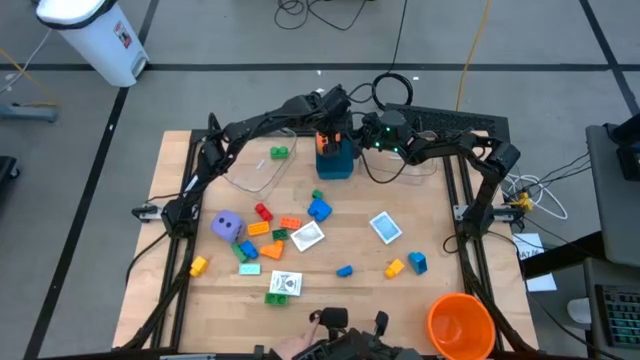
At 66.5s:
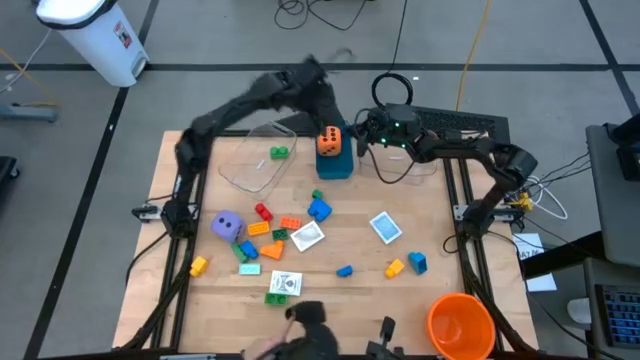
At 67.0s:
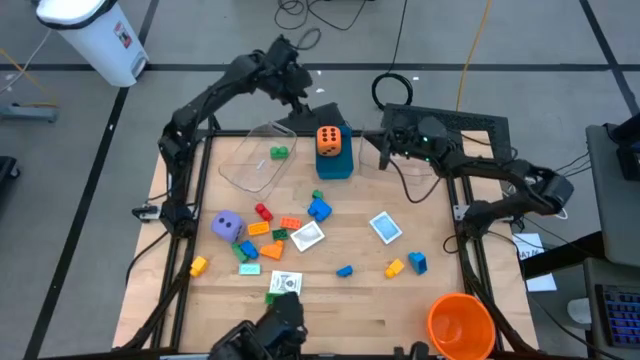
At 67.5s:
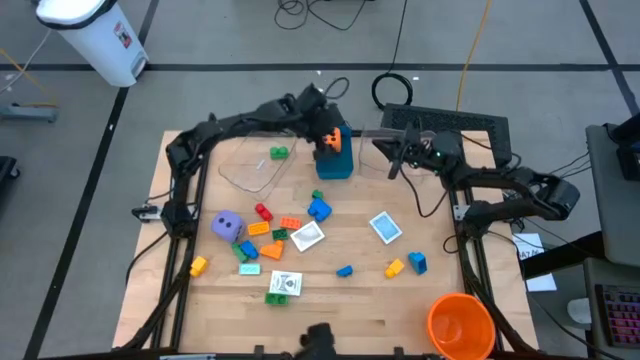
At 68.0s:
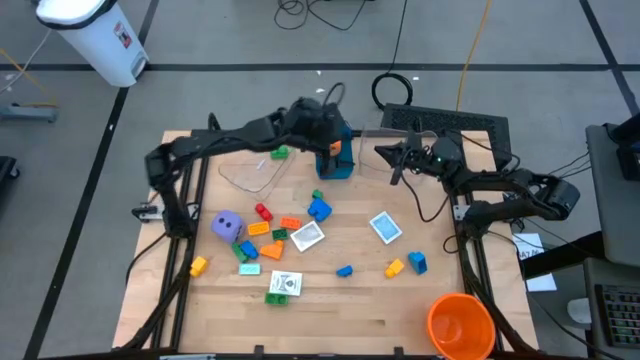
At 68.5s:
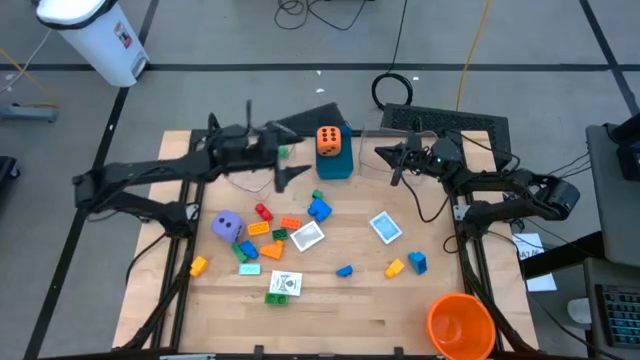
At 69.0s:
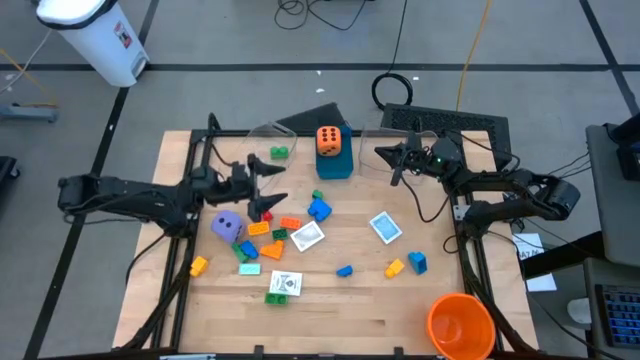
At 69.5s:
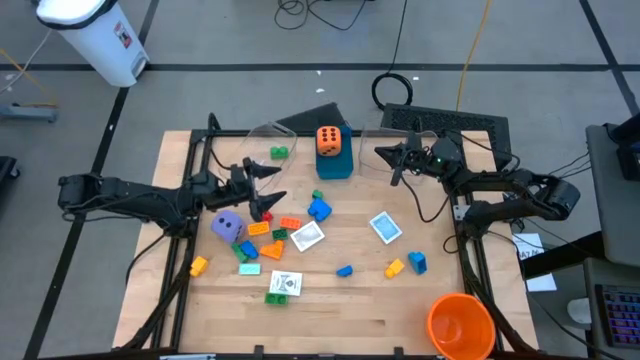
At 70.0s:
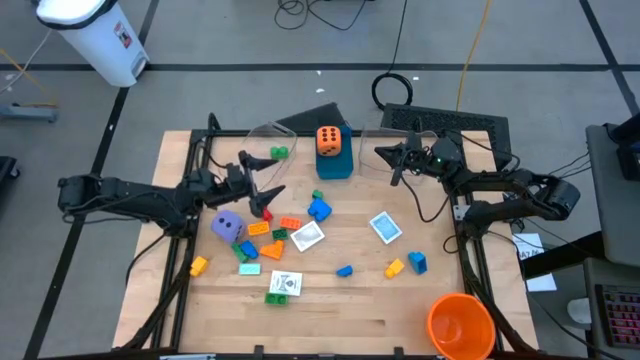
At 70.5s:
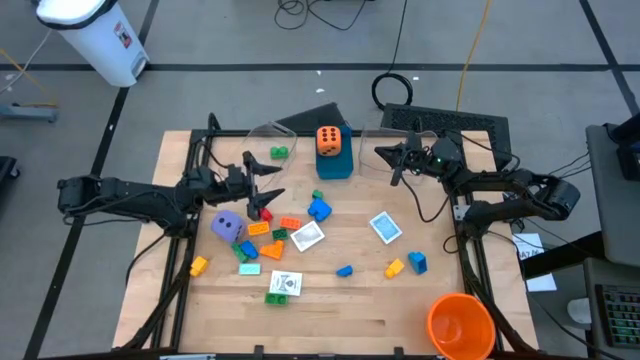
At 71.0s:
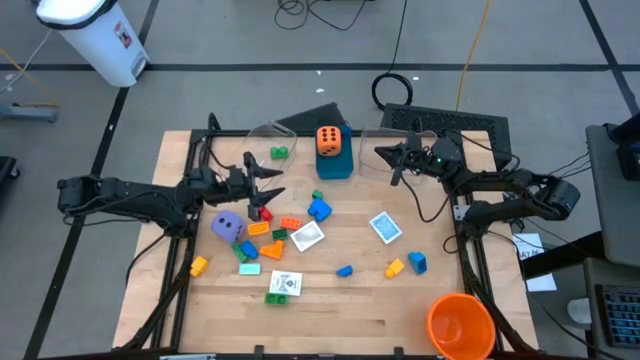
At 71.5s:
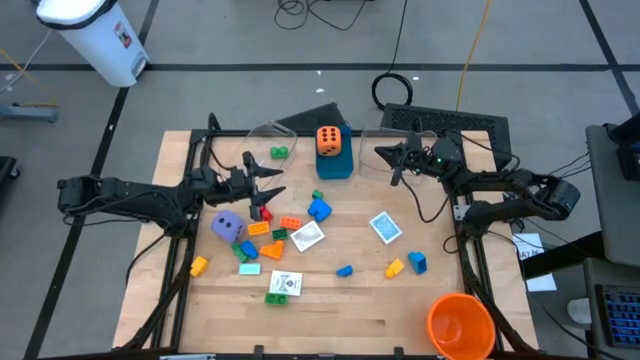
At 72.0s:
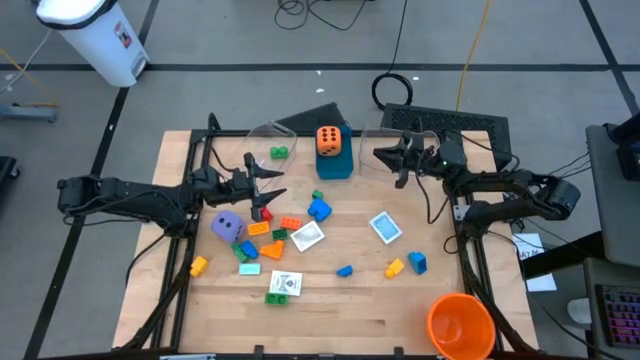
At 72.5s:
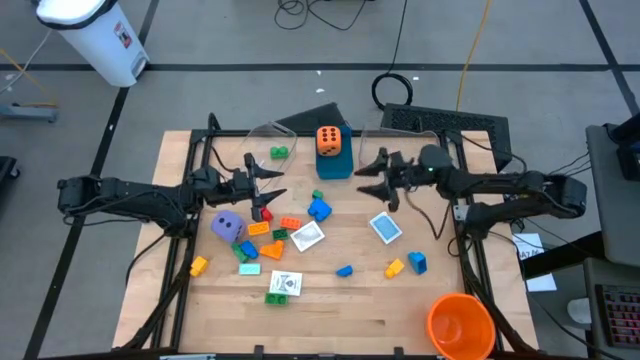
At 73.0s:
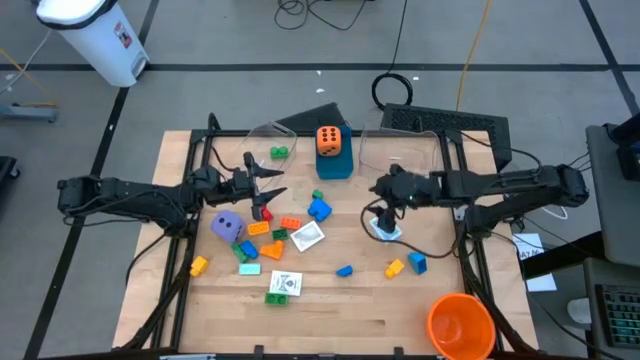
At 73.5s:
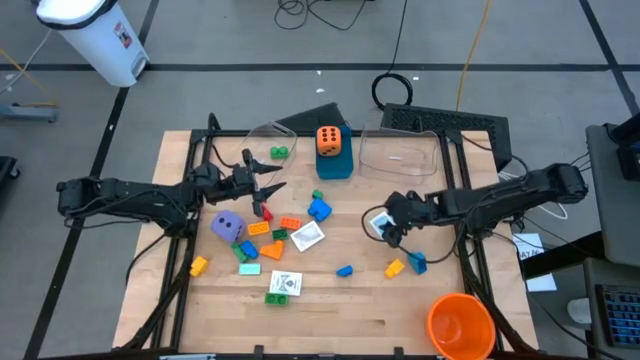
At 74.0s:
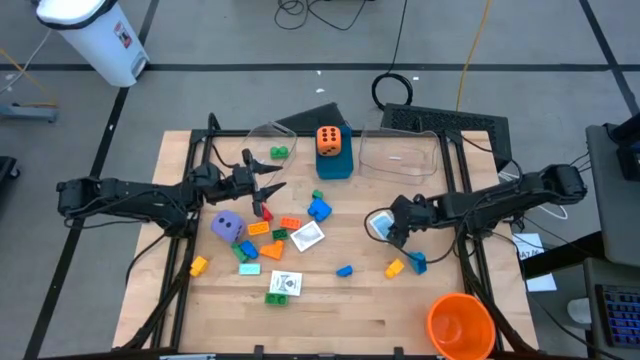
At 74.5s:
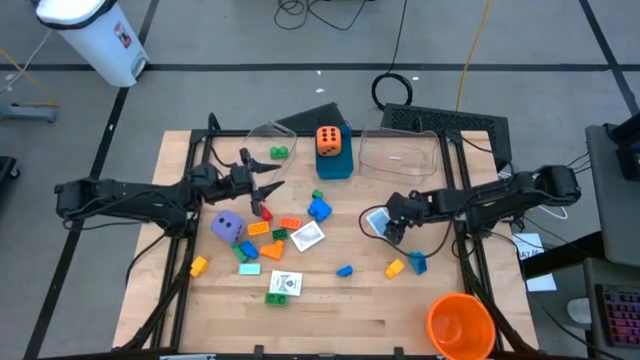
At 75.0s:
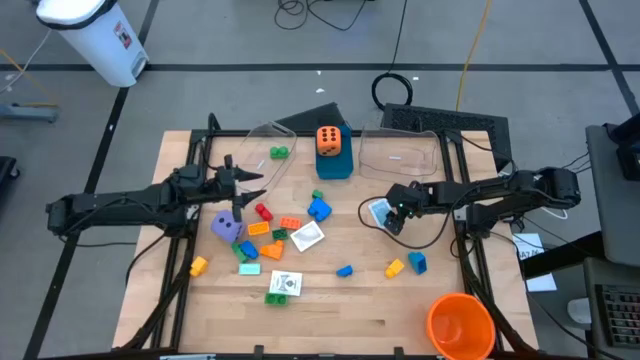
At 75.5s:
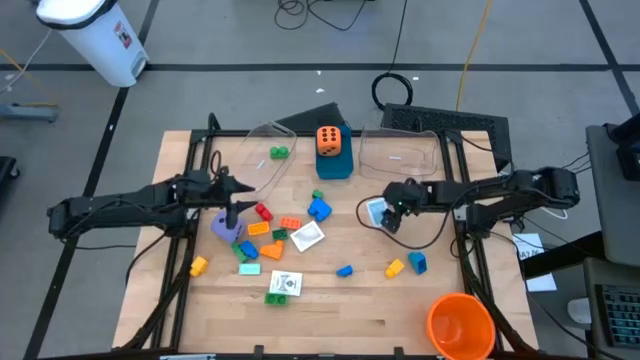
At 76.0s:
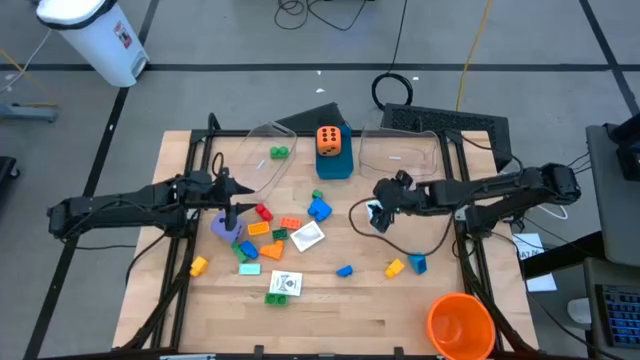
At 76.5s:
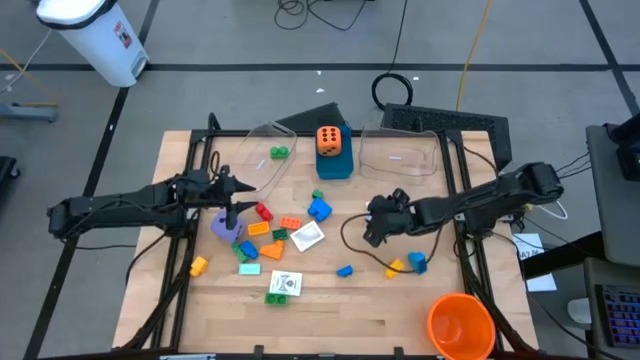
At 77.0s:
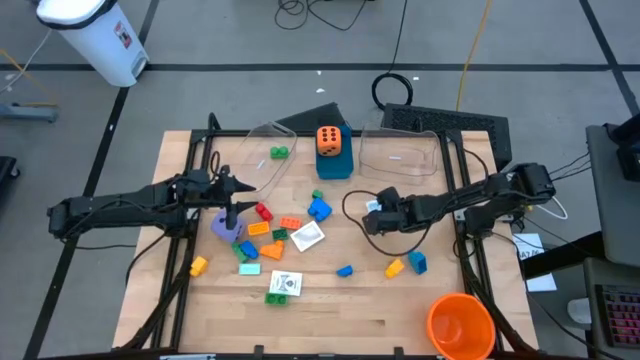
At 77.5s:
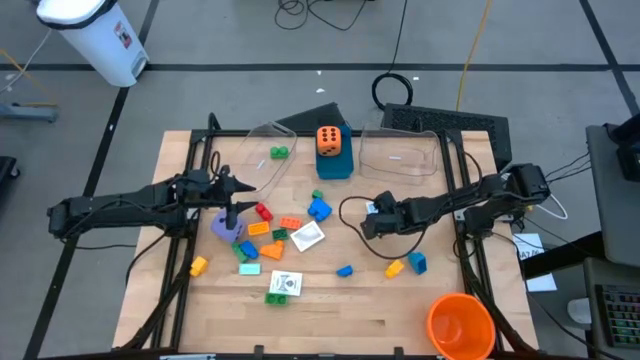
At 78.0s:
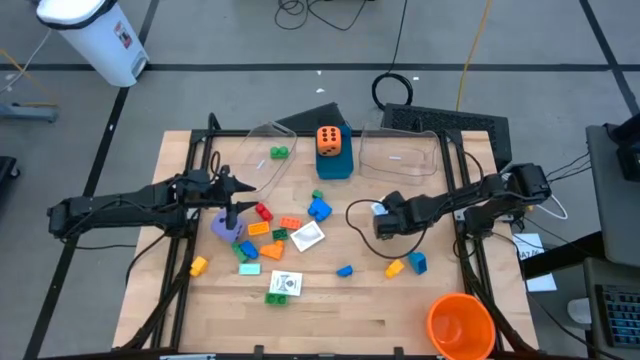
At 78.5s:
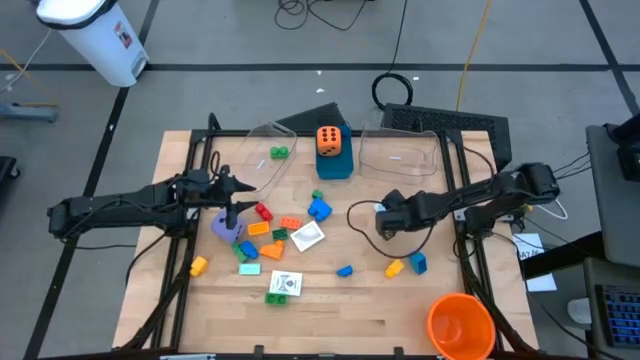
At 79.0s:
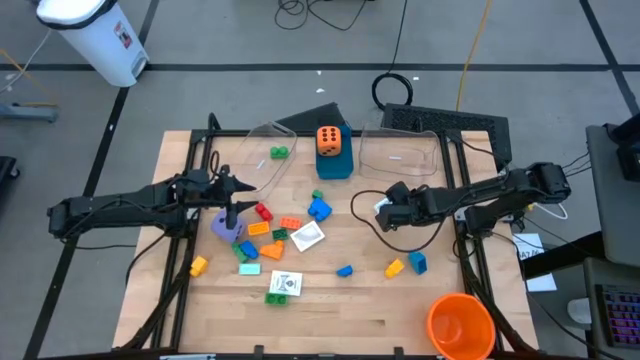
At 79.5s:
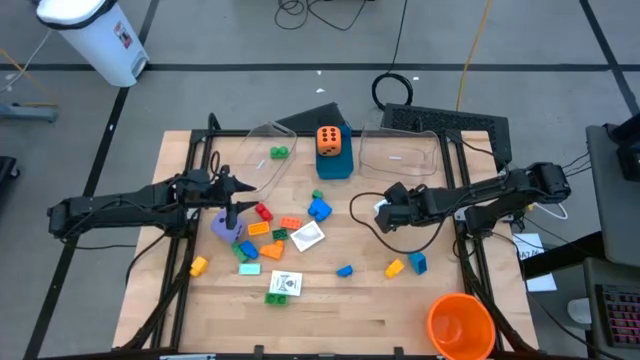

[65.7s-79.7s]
Task: Pick & Place Toys
Put the green playing card into the right transparent bin

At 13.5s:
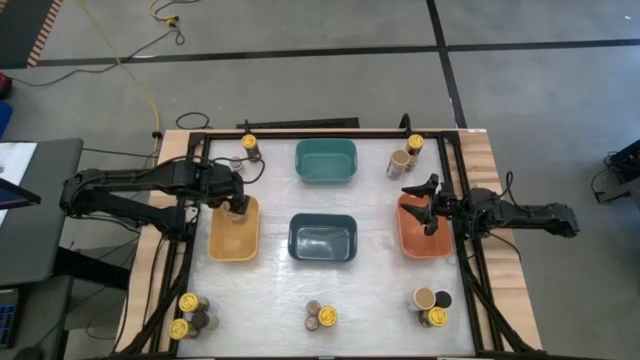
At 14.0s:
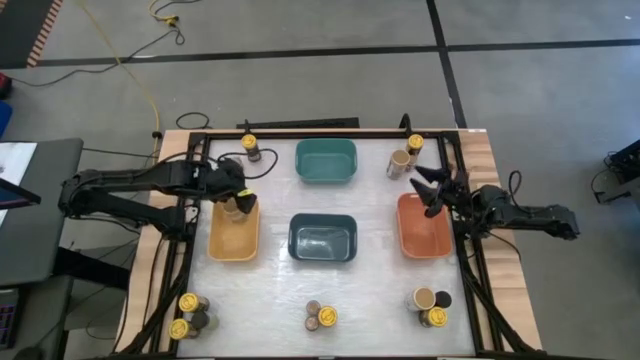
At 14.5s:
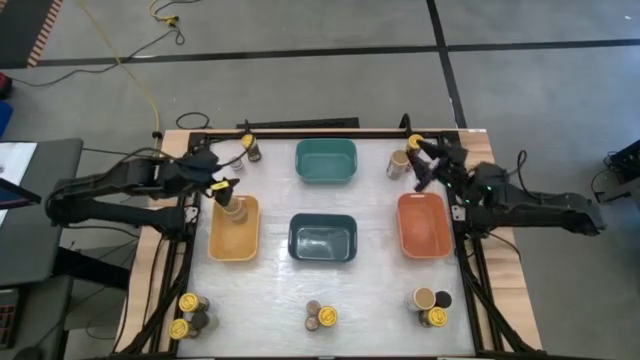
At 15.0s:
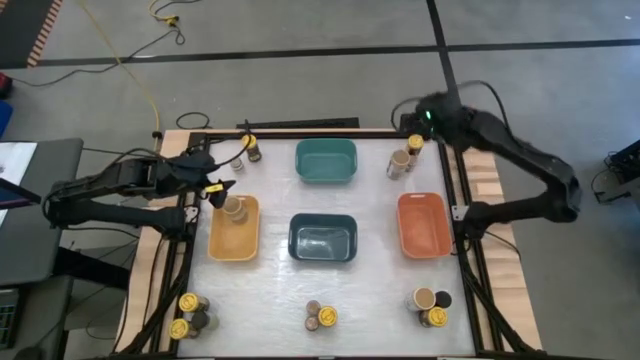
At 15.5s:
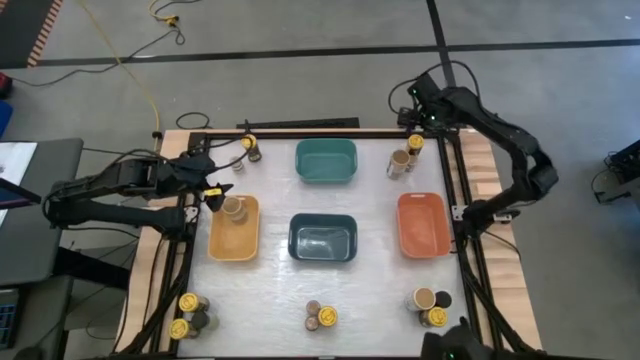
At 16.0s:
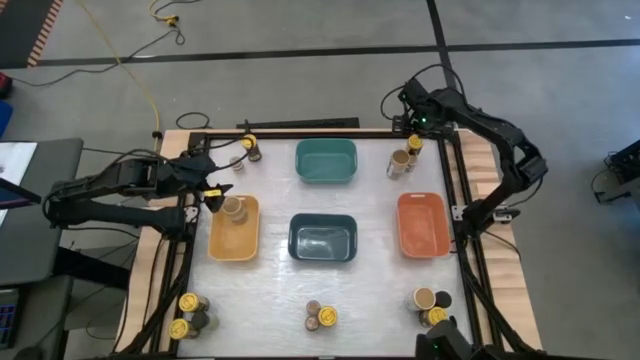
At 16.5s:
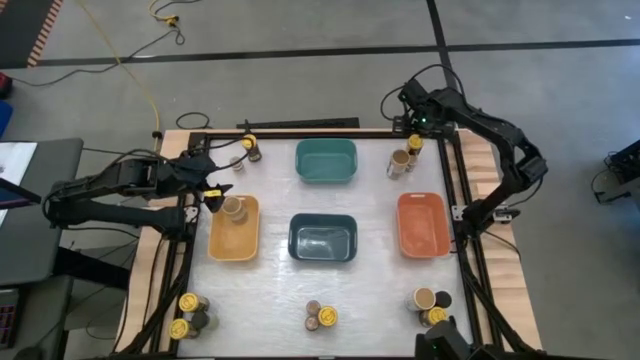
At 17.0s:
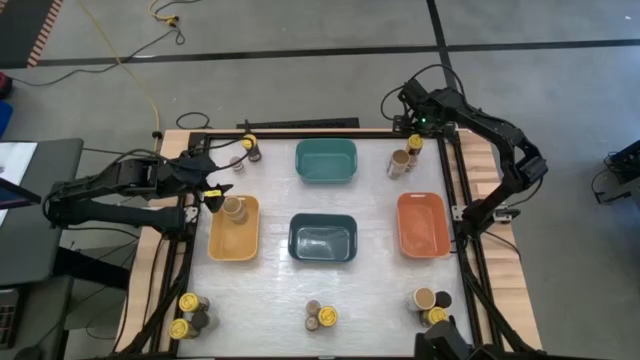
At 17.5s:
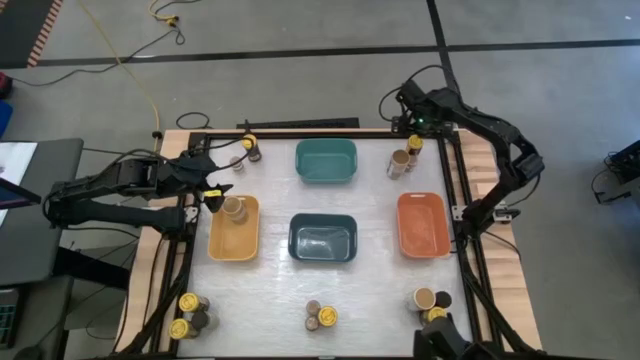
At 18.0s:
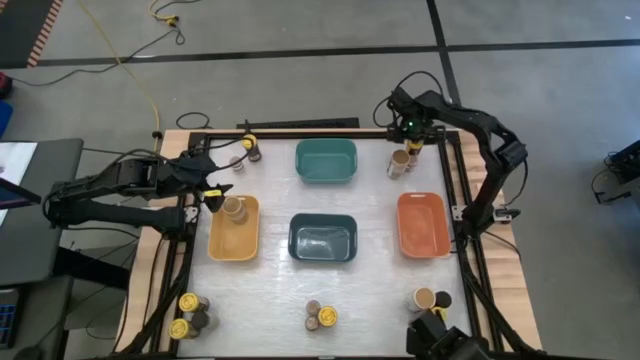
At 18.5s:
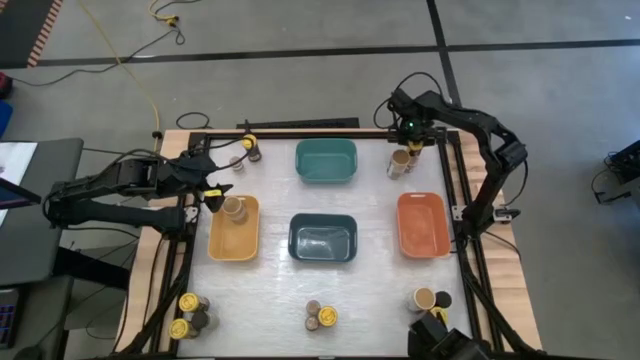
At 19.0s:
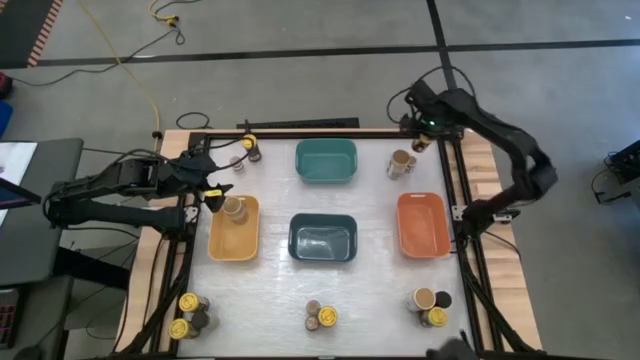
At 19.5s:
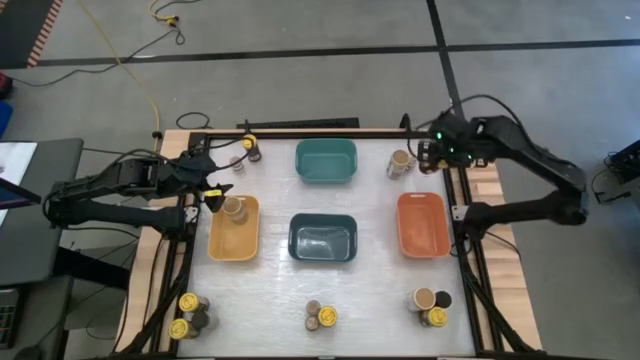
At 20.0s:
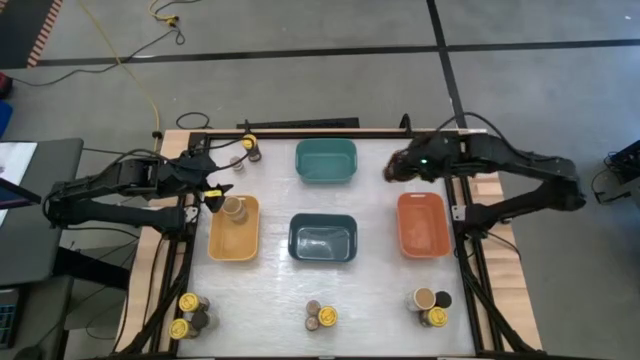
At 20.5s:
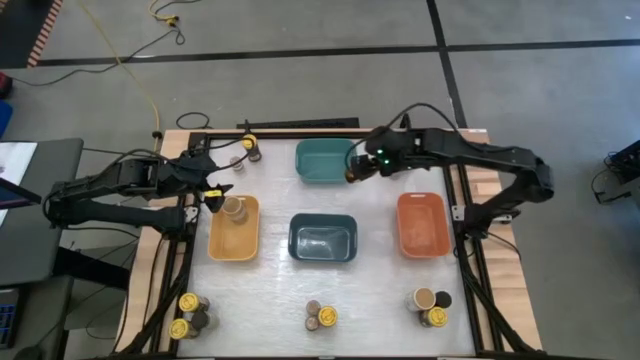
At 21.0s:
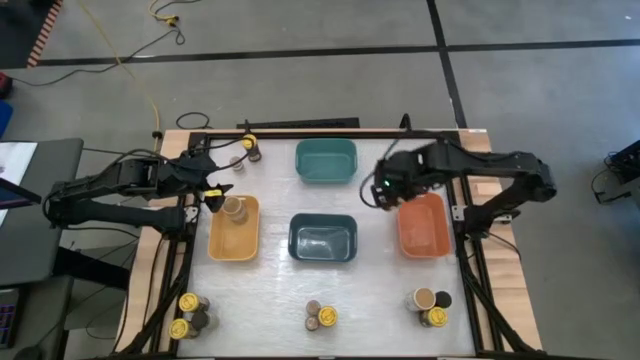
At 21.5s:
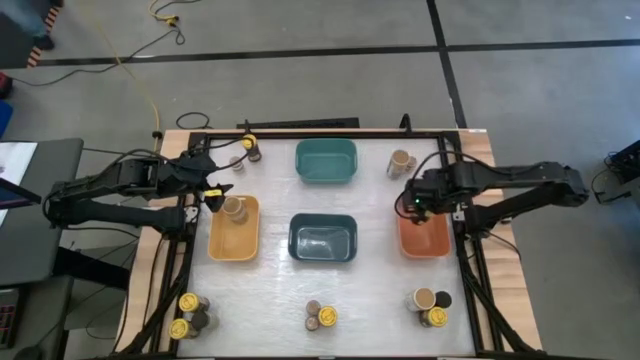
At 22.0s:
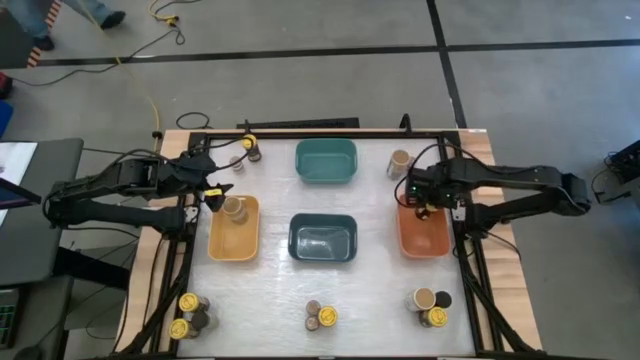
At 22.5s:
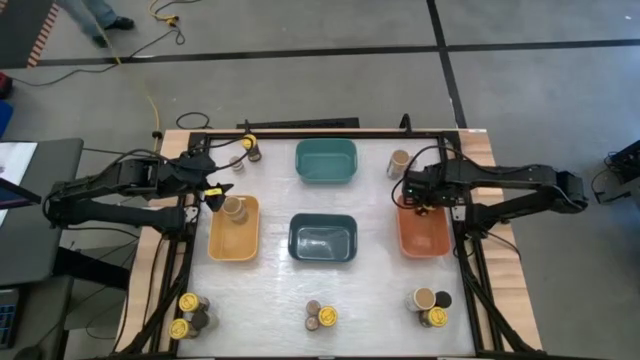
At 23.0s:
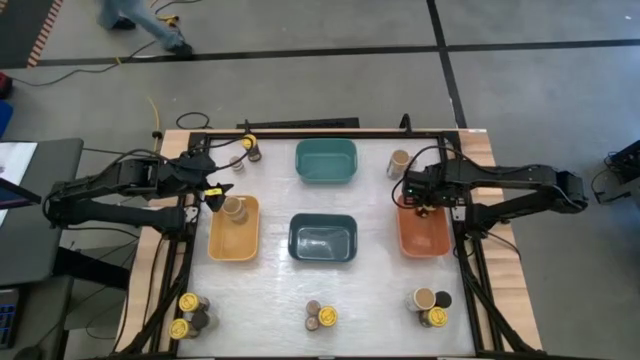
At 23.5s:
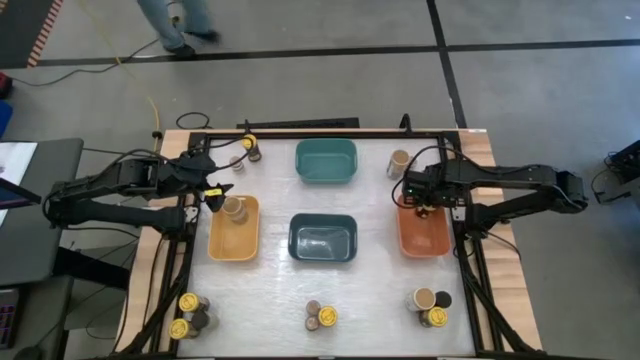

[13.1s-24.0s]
Task: Sort spices by type
Put the yellow seasoning bottle into the orange bin
